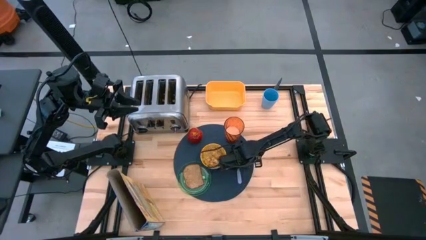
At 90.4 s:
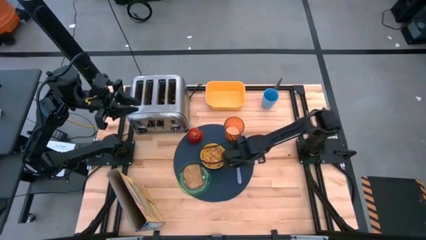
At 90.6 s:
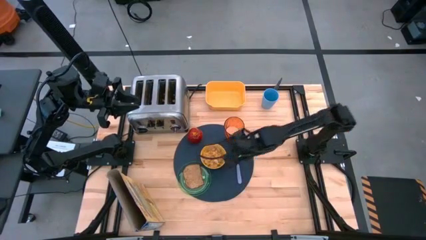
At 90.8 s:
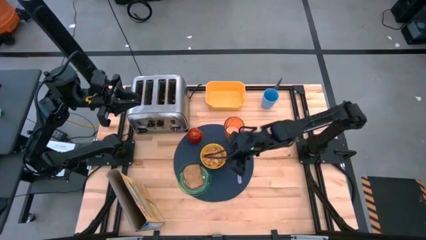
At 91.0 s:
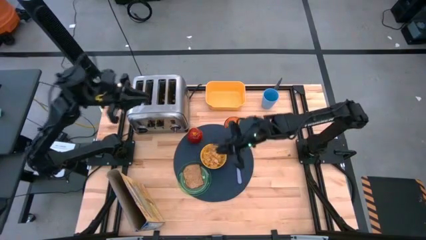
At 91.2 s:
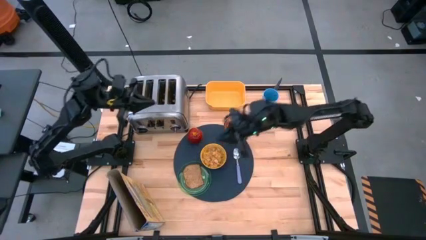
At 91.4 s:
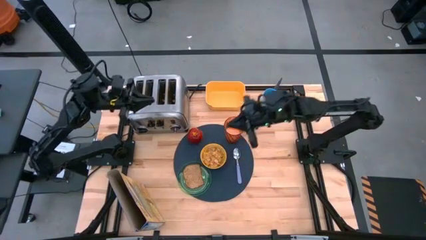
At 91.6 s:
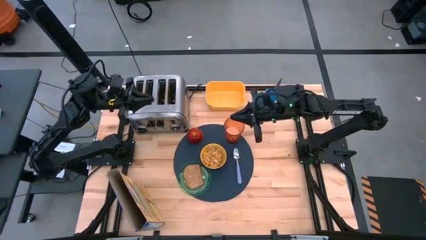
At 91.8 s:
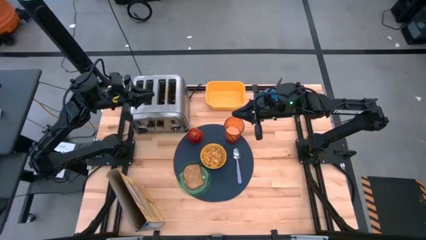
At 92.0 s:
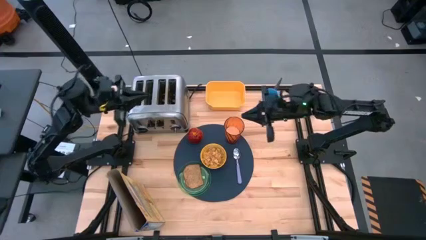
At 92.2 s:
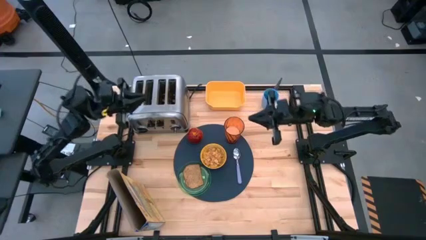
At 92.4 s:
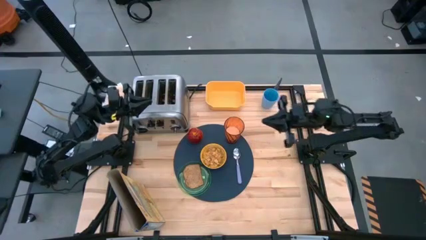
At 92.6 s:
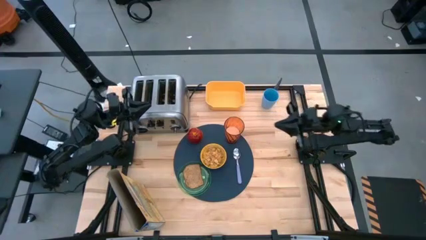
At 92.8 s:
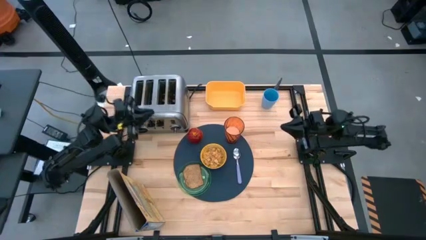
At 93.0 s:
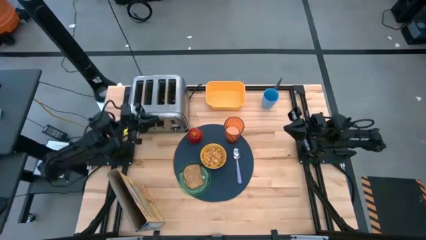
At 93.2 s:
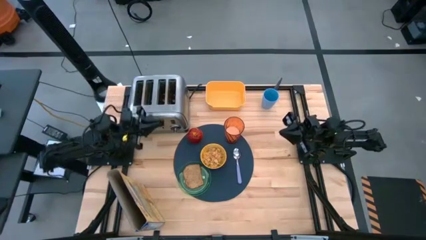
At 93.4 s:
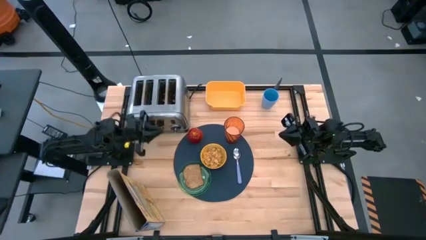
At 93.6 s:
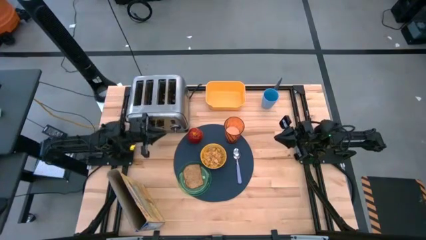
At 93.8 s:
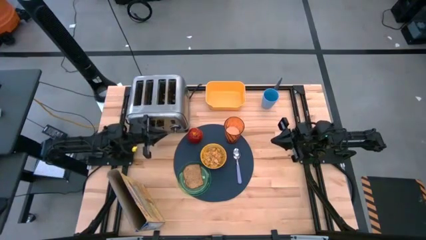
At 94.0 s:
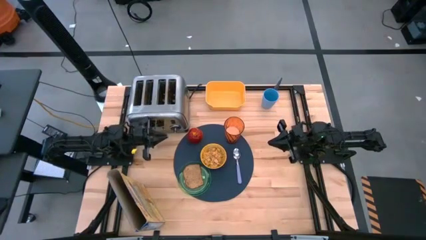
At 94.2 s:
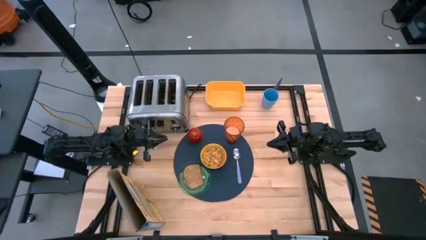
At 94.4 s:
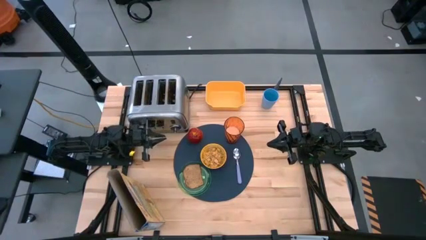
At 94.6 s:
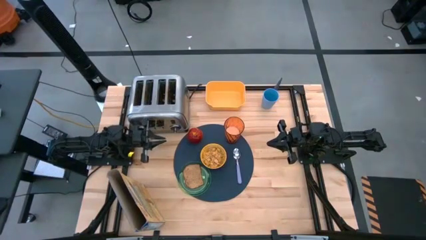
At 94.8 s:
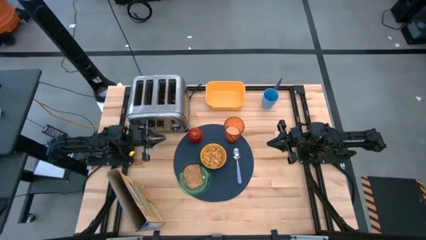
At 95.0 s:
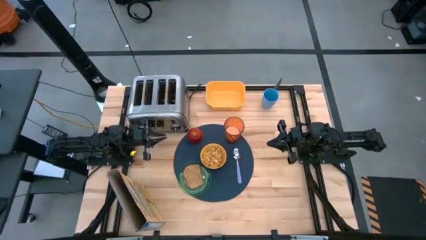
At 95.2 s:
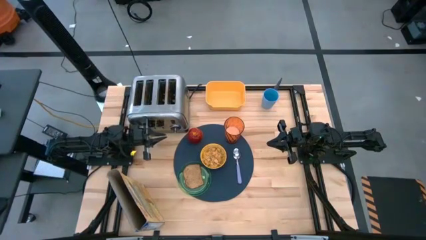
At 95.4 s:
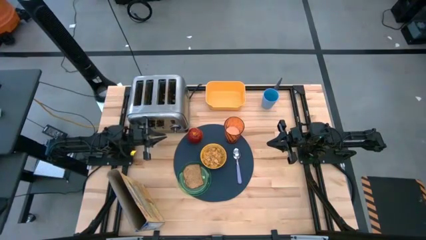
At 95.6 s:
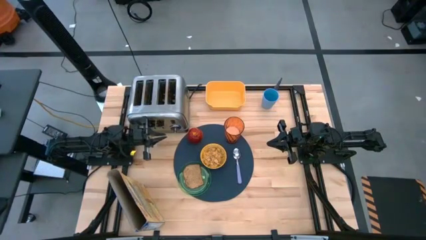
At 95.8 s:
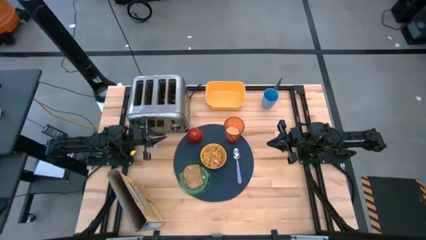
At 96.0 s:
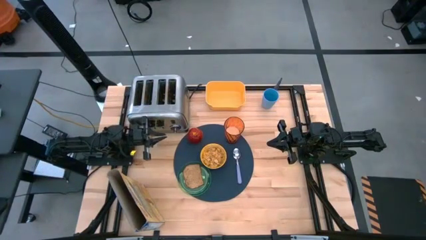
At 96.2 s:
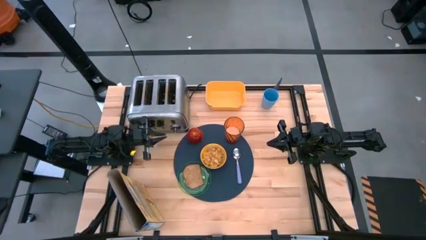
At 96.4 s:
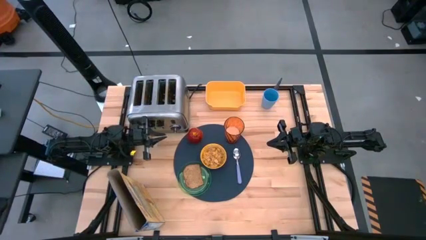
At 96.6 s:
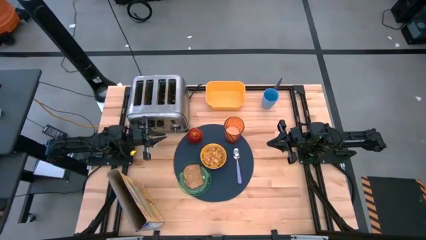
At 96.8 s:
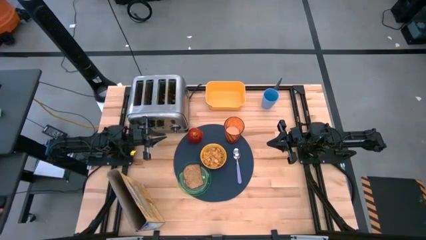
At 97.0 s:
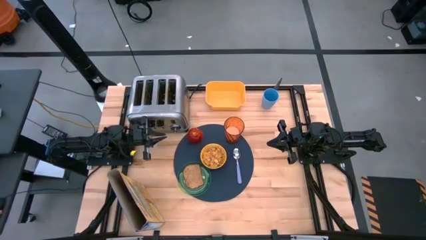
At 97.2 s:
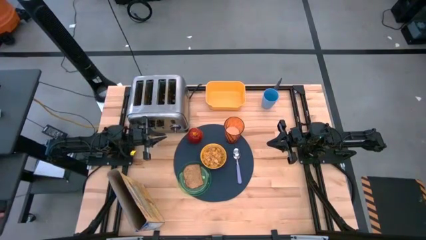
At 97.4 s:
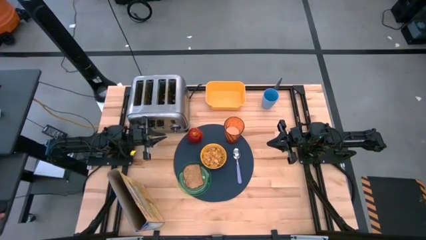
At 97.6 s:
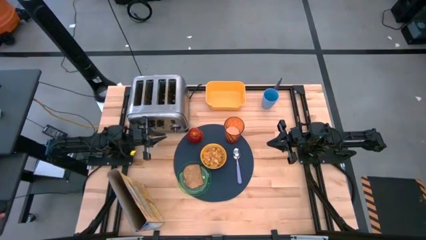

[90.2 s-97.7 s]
Task: Arrange a breakfast setting
Return to Home Position
